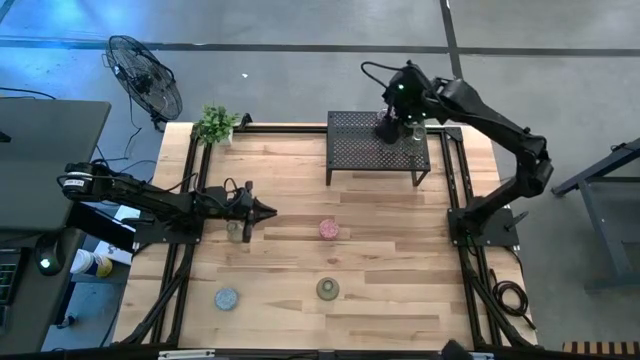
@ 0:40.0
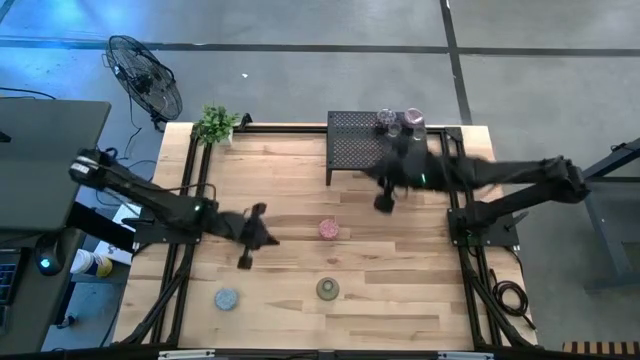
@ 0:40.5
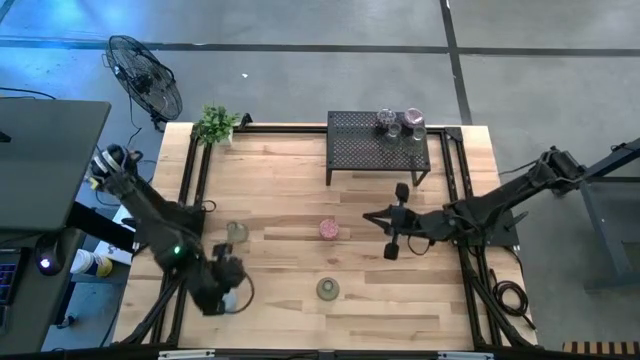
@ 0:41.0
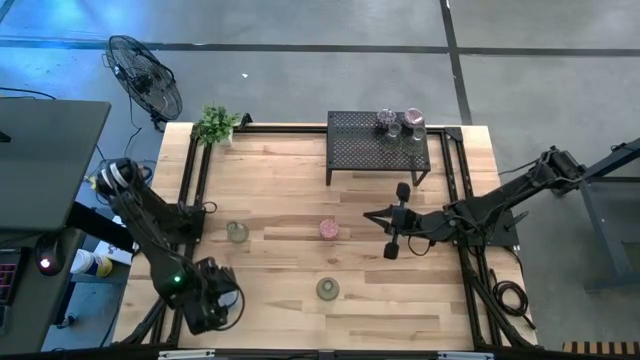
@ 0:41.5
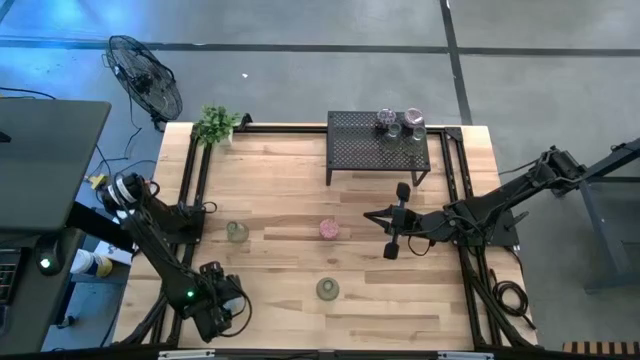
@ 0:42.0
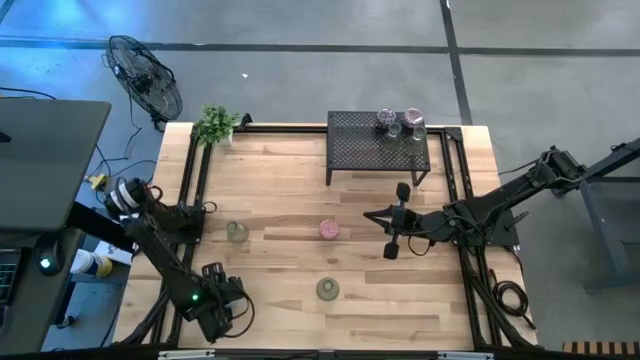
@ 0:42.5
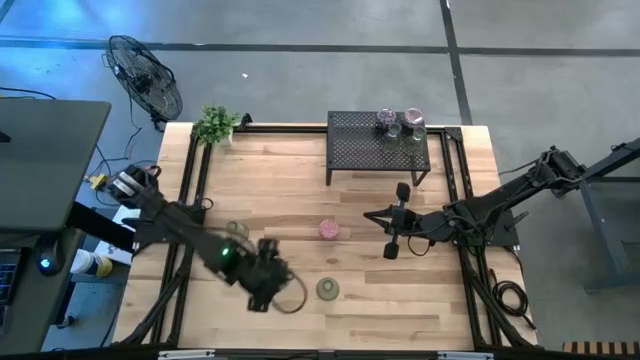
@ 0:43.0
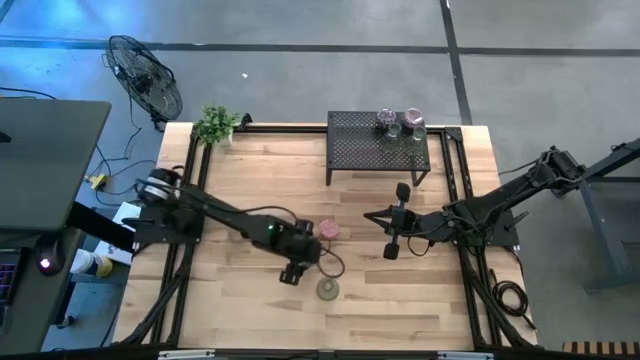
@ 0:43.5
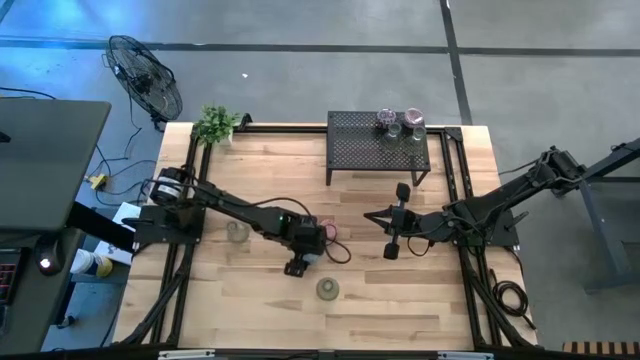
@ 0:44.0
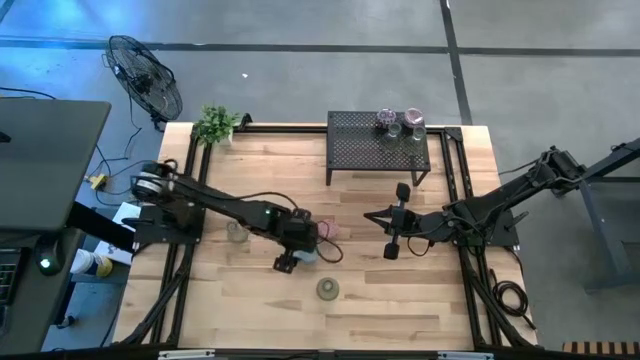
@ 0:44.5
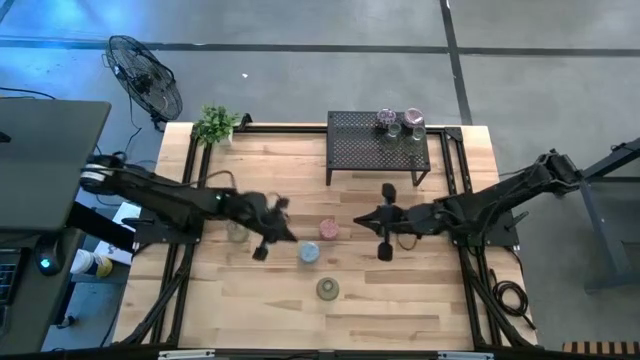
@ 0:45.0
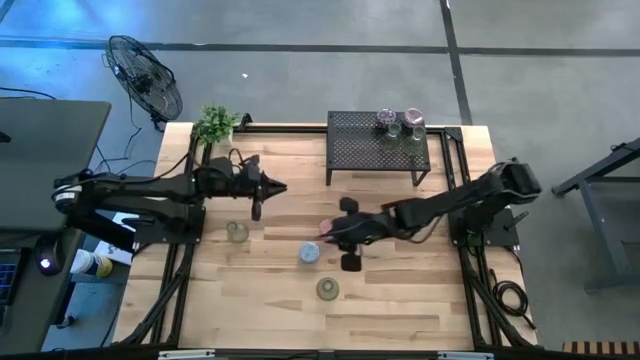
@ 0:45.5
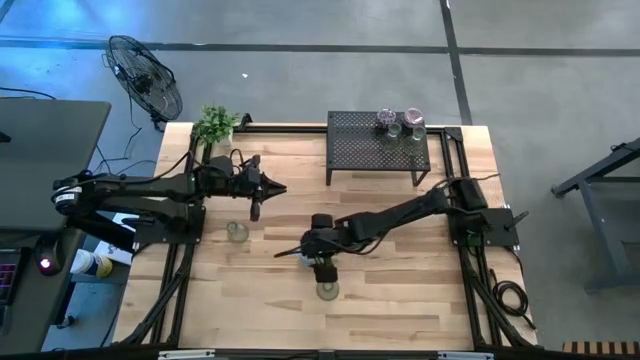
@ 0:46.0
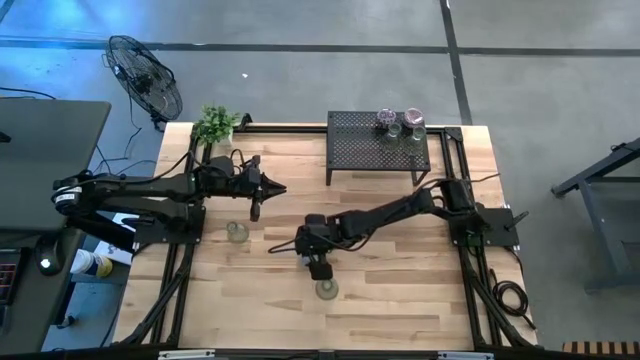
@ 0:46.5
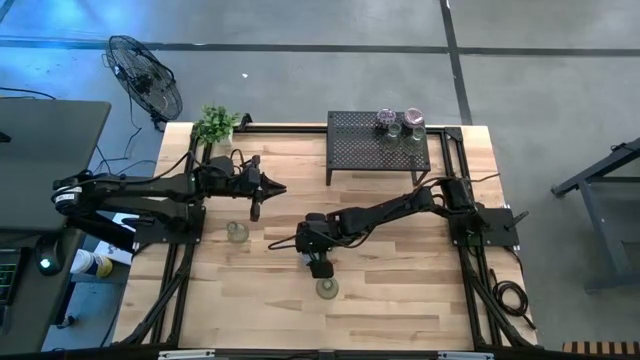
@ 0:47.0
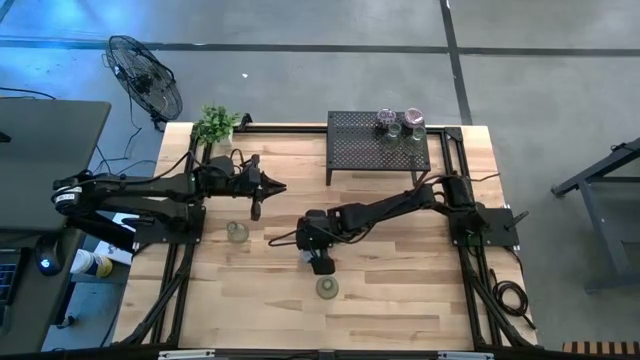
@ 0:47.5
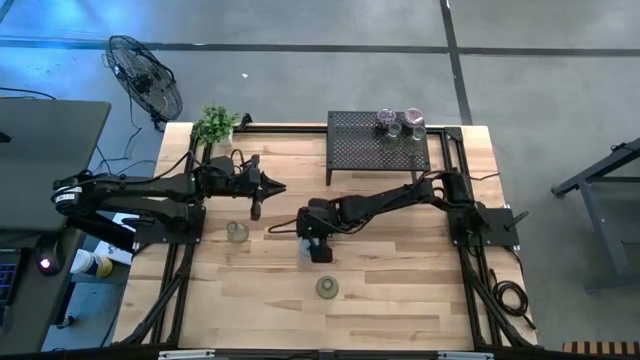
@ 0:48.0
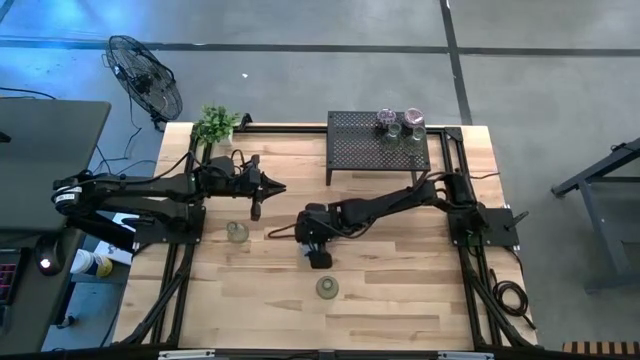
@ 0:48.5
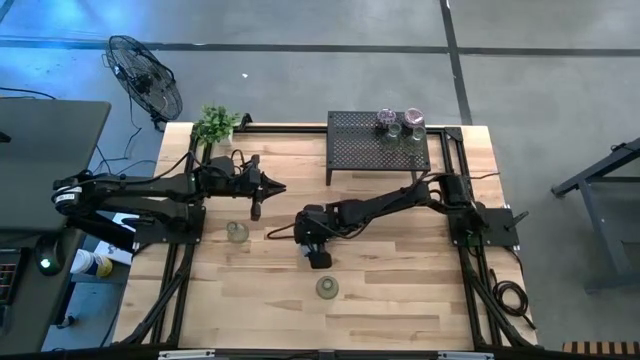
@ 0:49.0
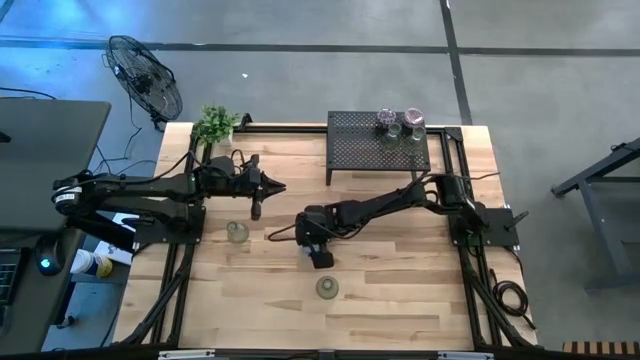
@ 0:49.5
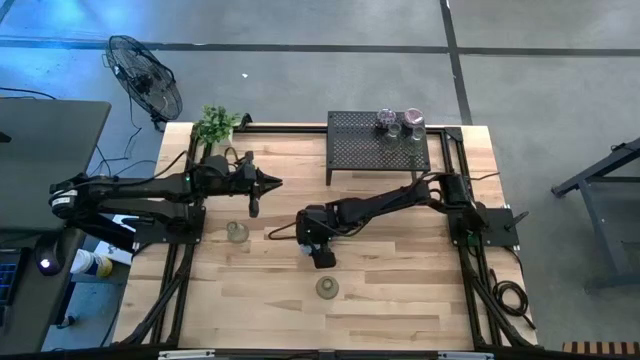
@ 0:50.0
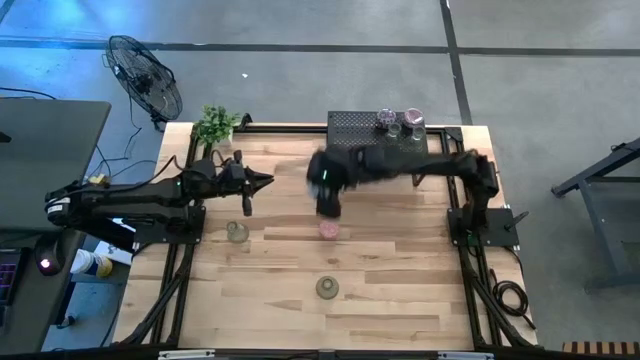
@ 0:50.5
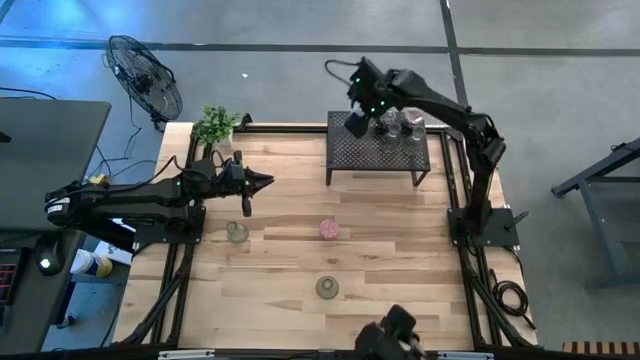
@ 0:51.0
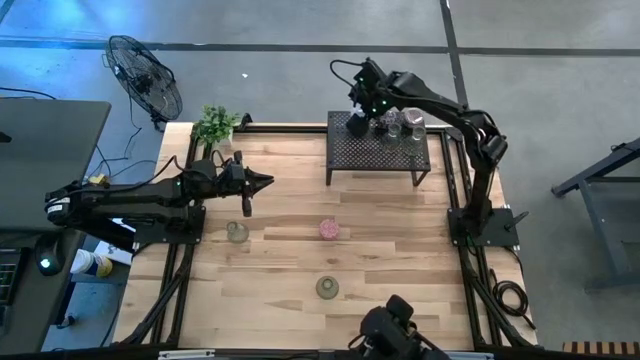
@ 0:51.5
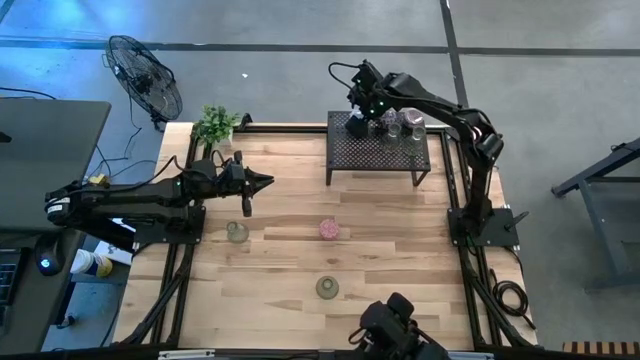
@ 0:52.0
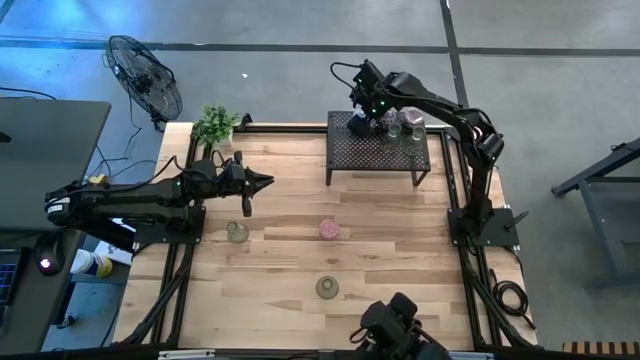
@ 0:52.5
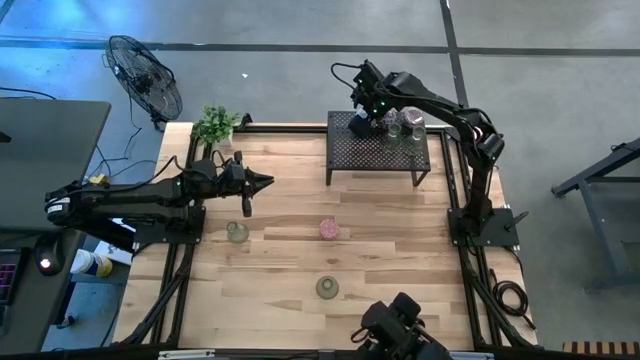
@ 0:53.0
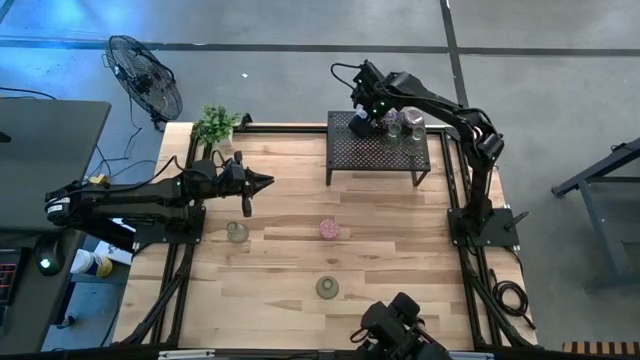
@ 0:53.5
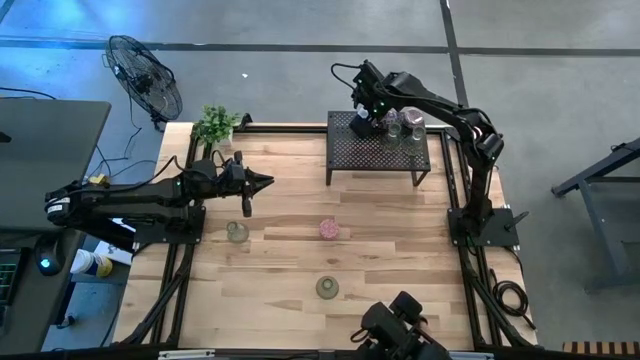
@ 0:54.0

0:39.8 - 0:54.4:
Task: Pick & Place candle stick holders
Put the blue scented candle on the shelf

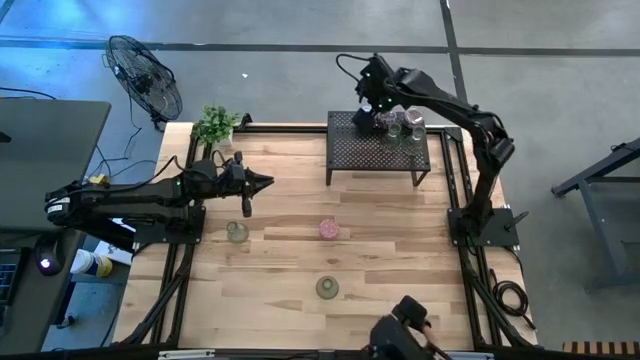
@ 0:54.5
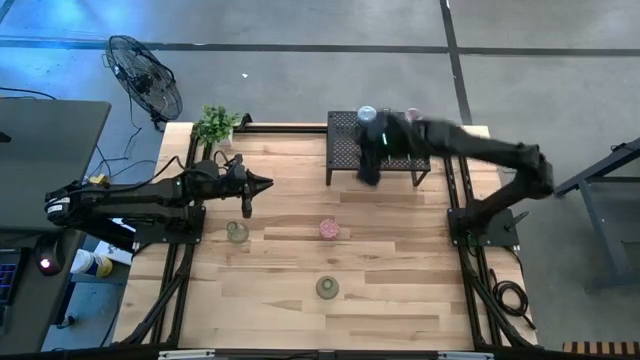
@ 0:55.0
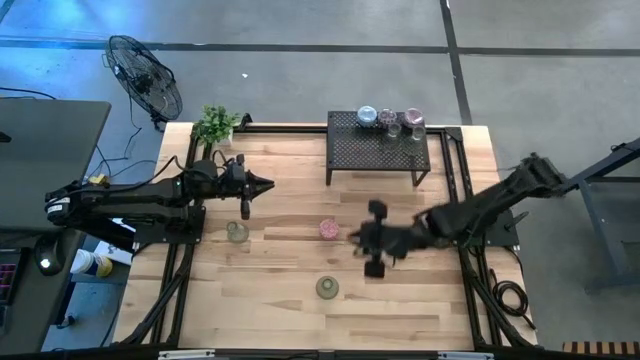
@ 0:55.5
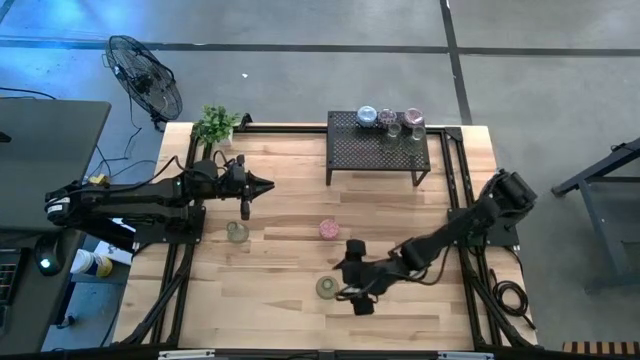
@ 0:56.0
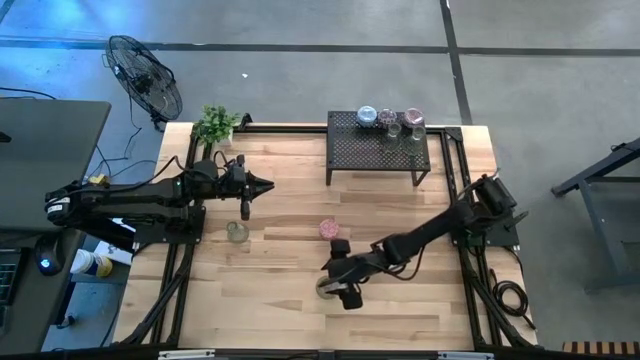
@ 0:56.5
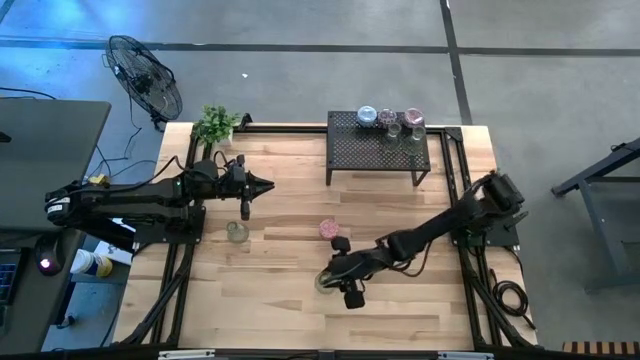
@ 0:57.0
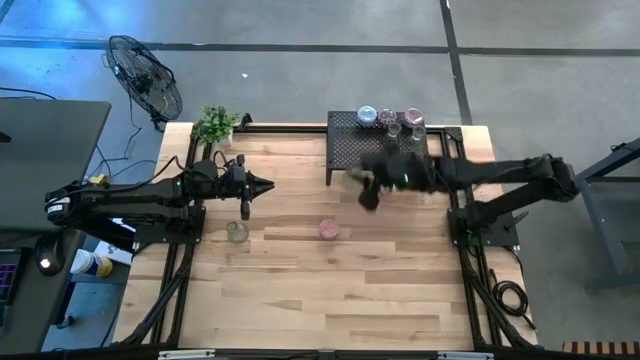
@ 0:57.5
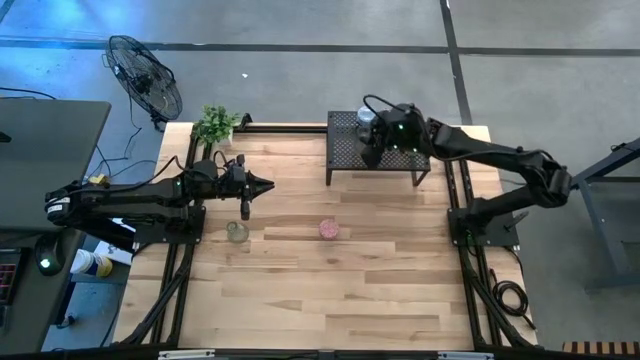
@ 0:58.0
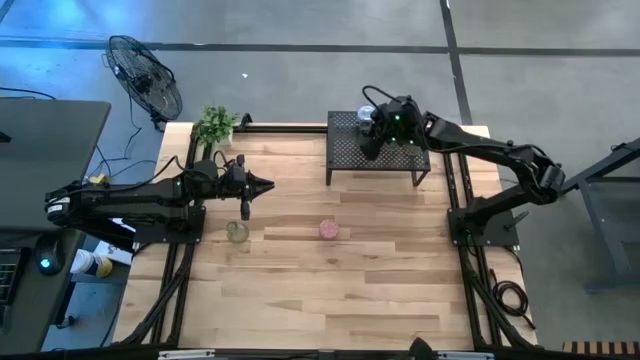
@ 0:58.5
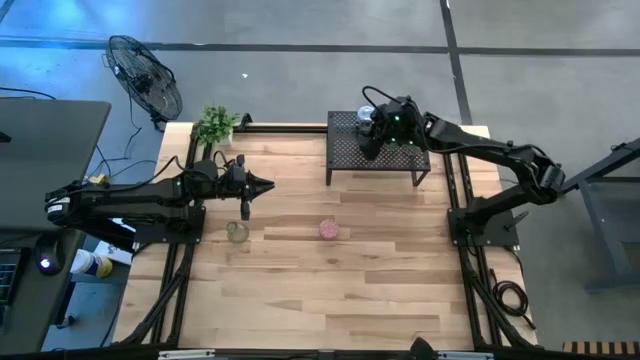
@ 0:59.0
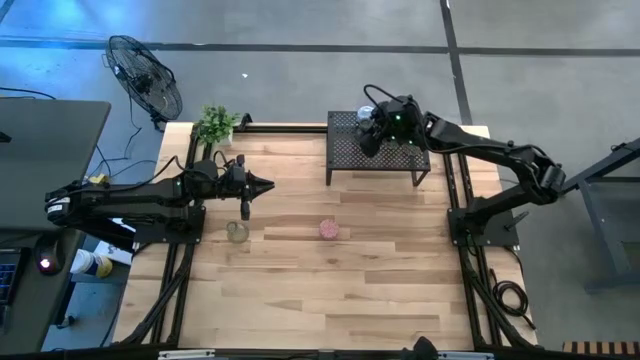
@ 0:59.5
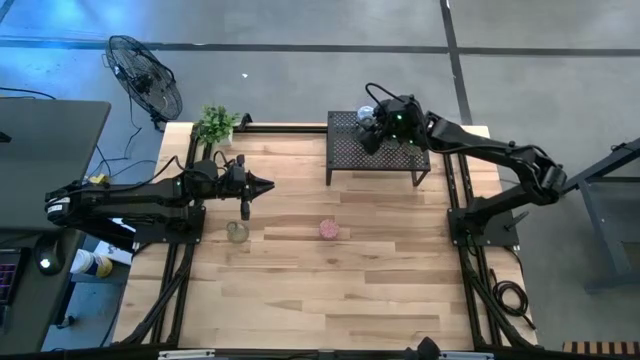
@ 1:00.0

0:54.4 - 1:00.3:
Put the green glass candle holder on the shelf
